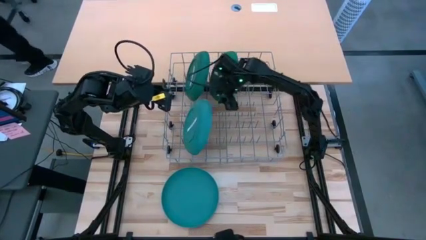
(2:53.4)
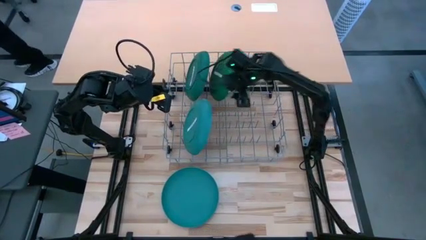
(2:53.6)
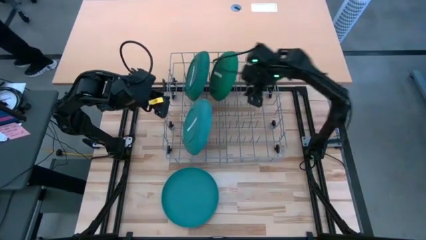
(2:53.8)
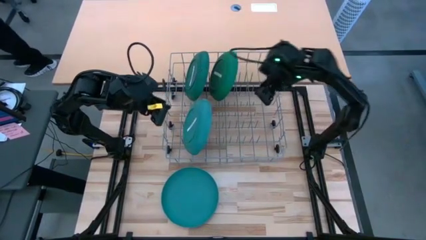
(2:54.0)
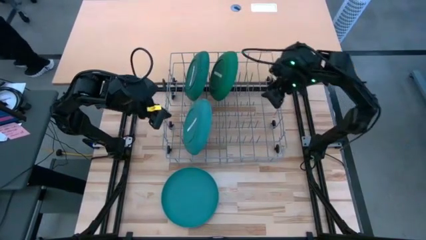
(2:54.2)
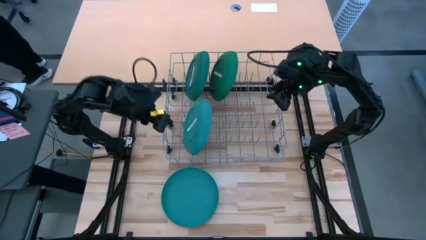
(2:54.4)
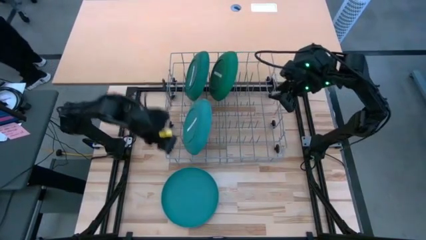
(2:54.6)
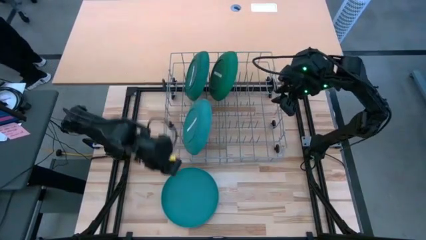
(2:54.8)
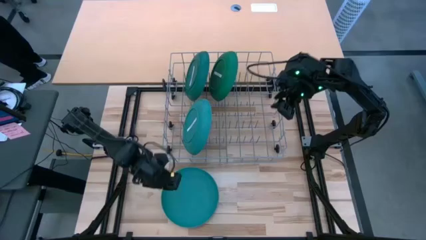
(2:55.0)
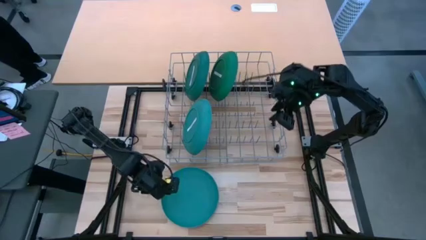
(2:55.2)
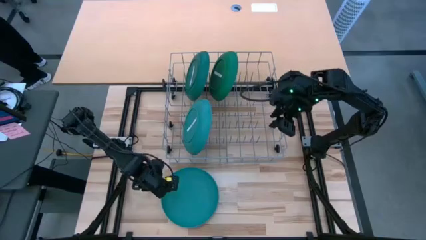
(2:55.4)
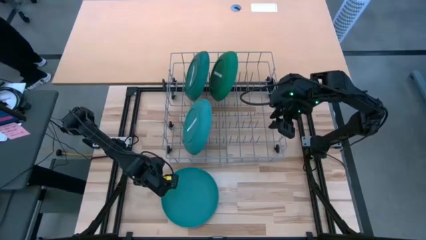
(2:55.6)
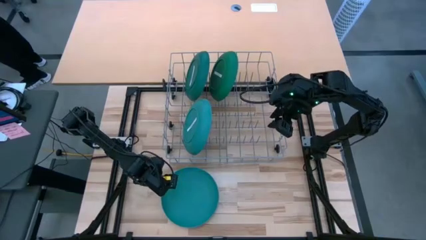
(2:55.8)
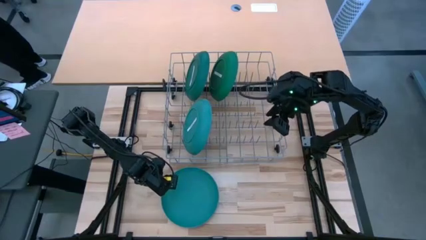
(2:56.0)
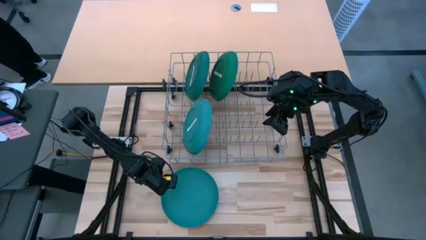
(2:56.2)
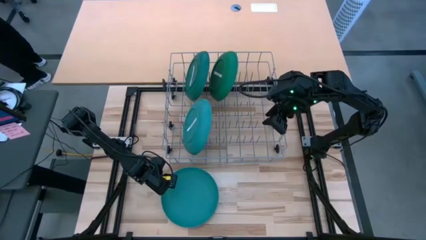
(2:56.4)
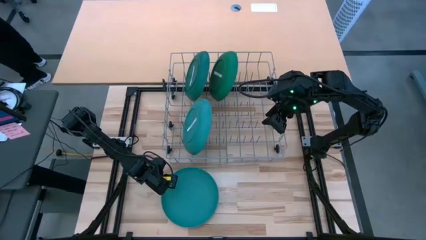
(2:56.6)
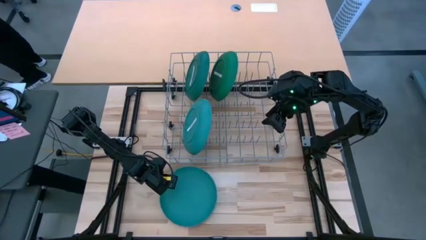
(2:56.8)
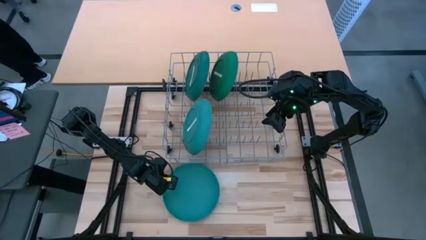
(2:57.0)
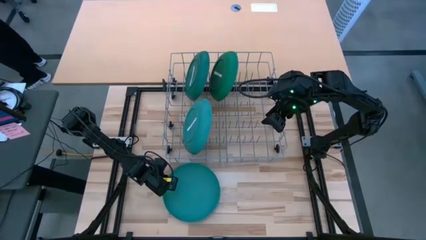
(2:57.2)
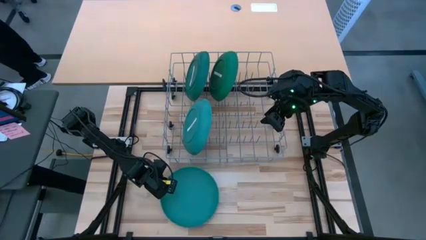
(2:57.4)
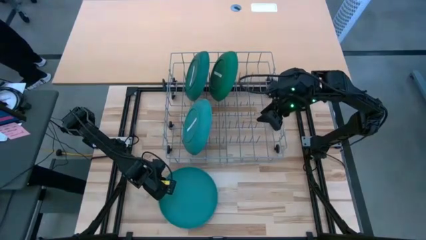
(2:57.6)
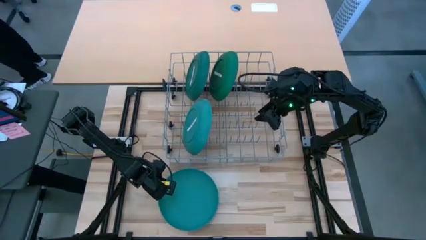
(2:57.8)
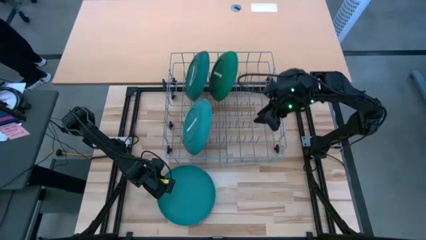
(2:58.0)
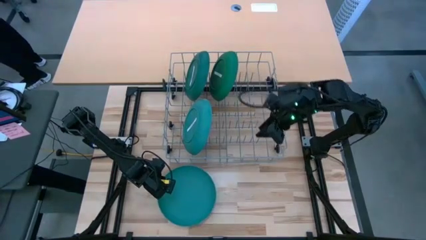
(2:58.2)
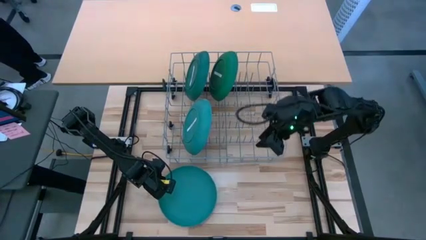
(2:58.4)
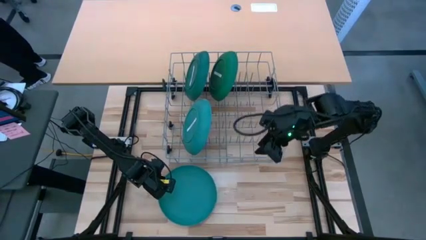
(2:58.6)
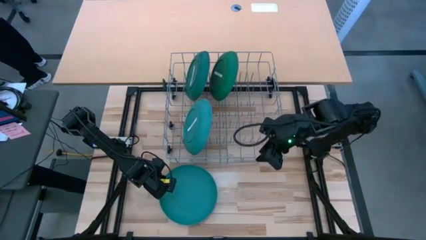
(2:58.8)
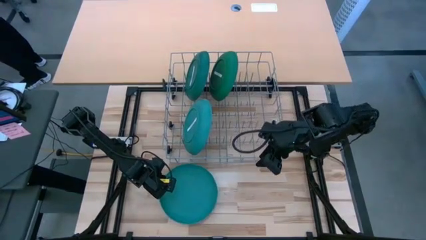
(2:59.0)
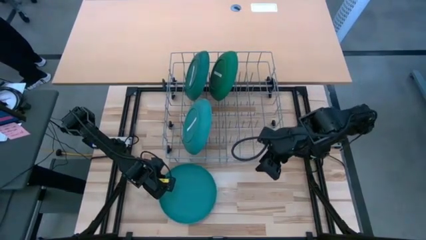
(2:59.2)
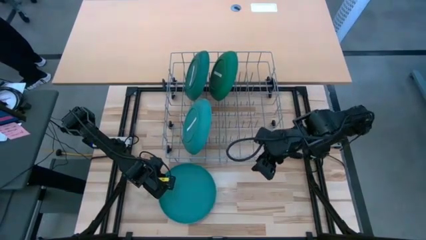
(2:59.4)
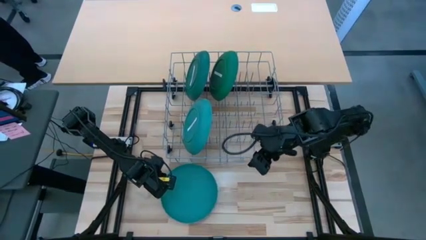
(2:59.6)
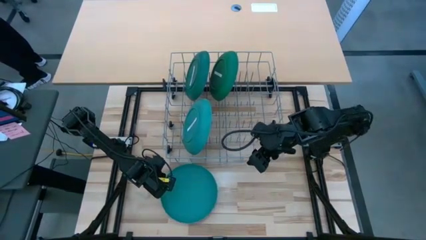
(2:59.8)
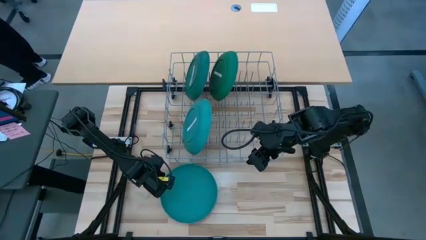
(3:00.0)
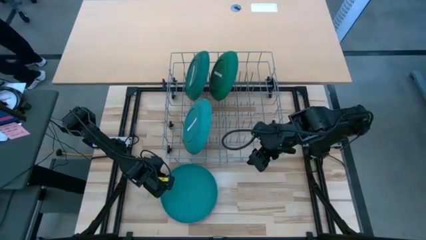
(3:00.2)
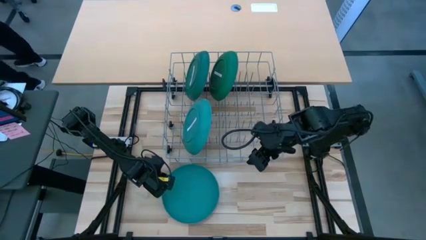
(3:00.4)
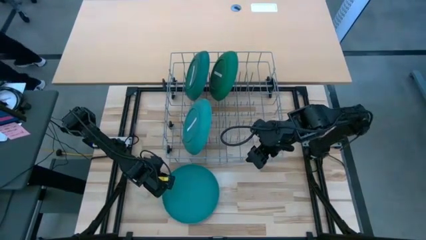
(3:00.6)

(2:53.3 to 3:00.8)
Task: Sort dishes
Put the blue plate into the dish rack

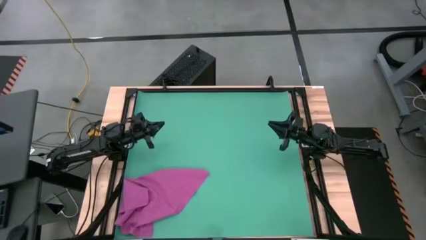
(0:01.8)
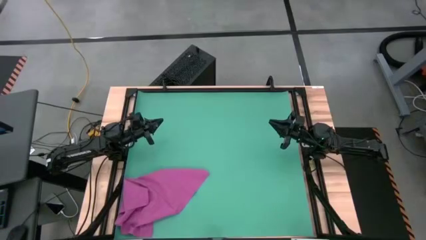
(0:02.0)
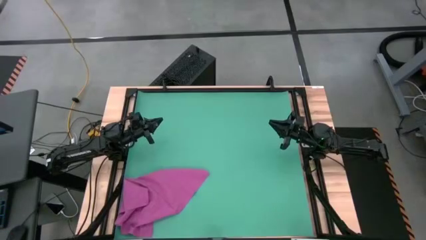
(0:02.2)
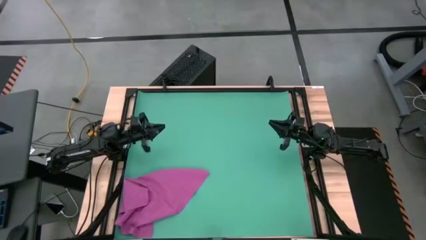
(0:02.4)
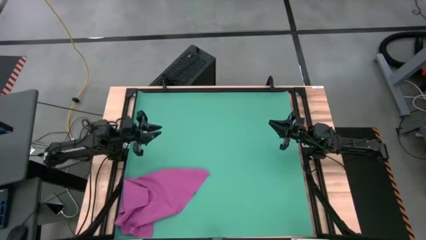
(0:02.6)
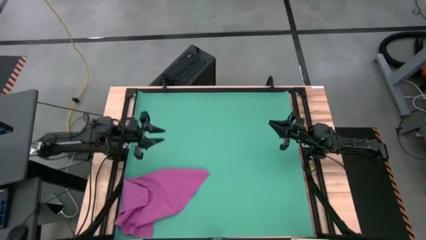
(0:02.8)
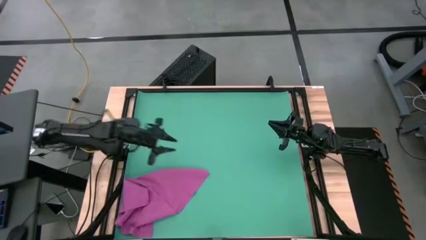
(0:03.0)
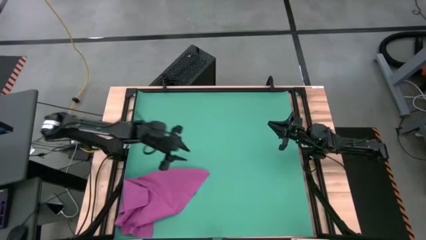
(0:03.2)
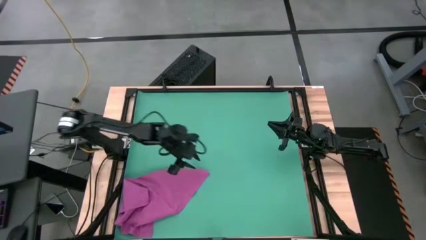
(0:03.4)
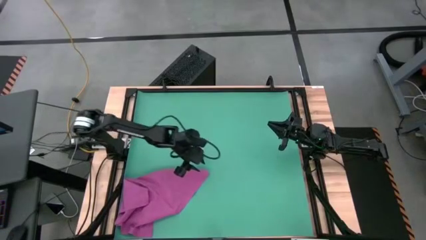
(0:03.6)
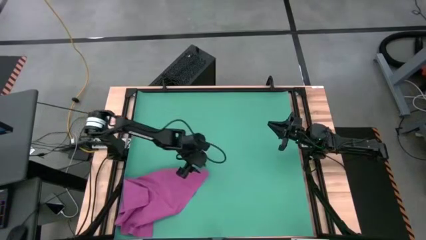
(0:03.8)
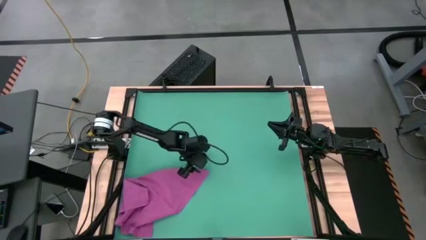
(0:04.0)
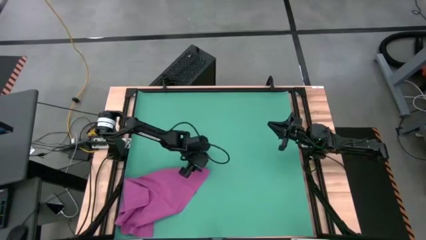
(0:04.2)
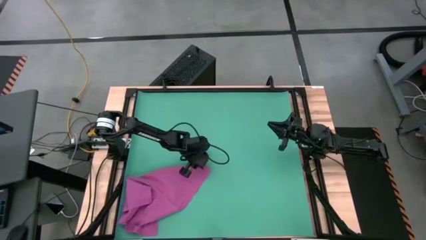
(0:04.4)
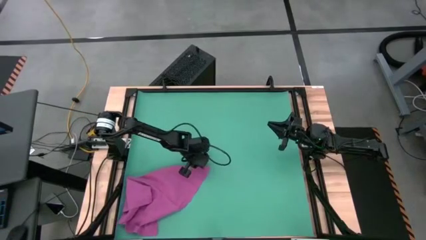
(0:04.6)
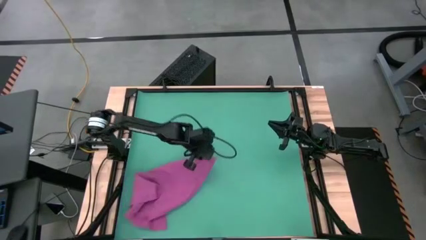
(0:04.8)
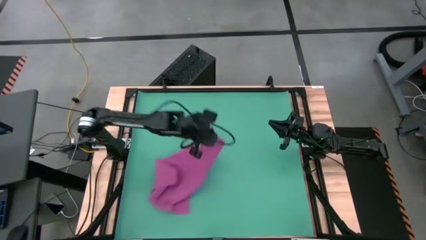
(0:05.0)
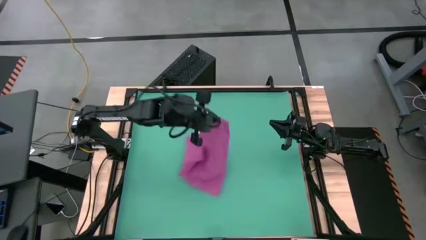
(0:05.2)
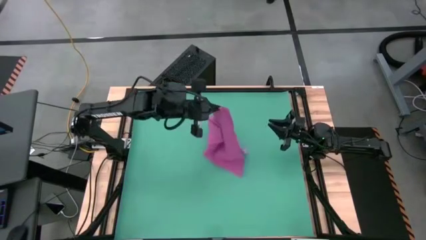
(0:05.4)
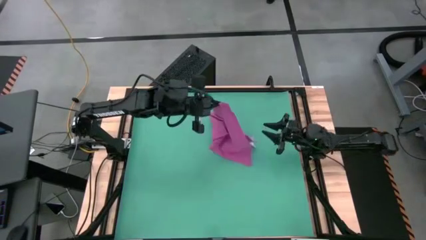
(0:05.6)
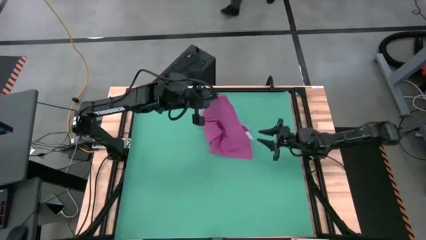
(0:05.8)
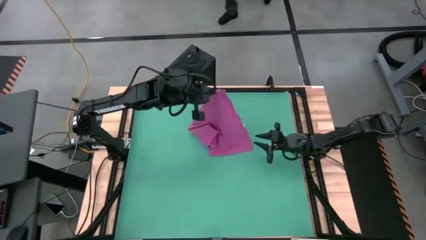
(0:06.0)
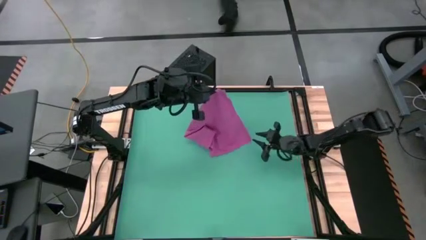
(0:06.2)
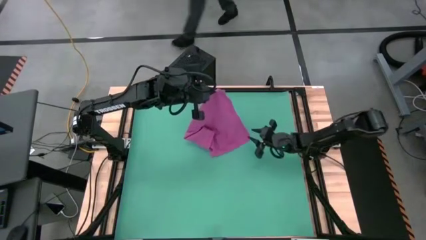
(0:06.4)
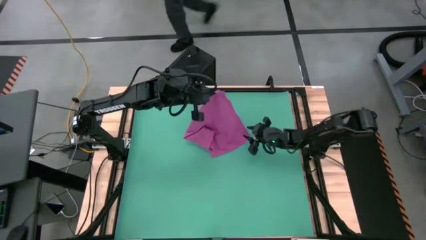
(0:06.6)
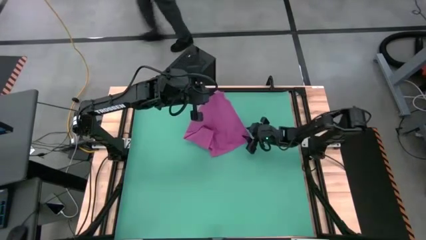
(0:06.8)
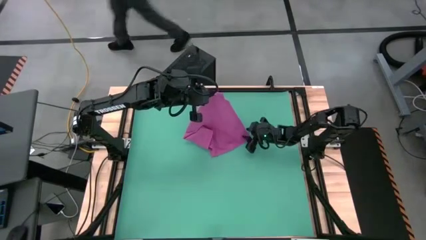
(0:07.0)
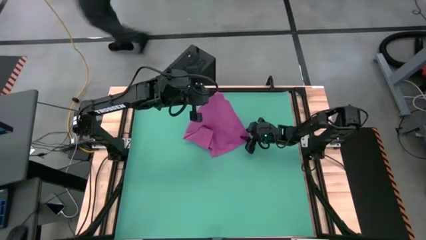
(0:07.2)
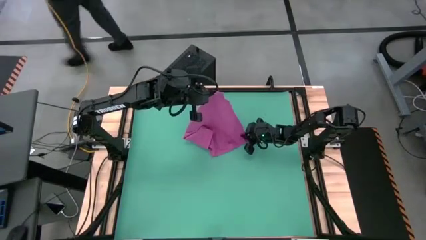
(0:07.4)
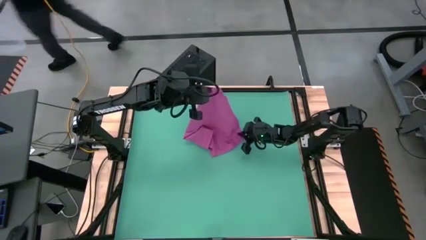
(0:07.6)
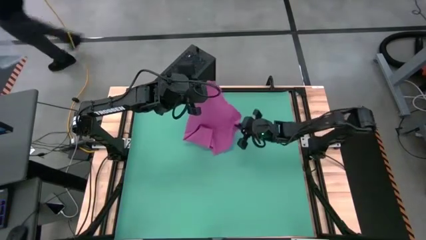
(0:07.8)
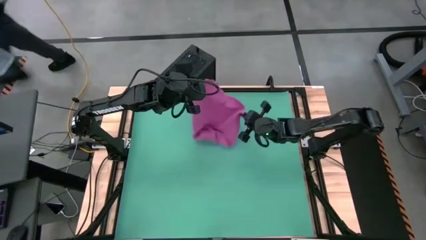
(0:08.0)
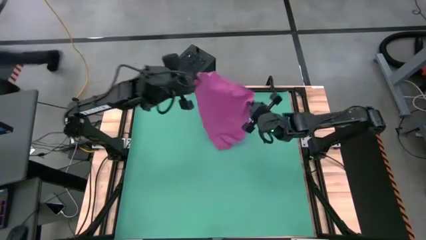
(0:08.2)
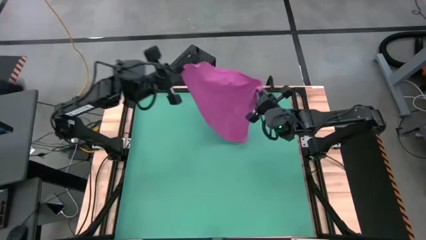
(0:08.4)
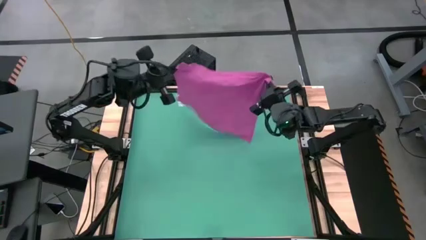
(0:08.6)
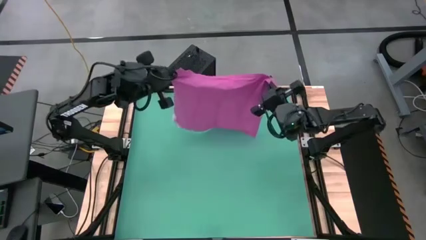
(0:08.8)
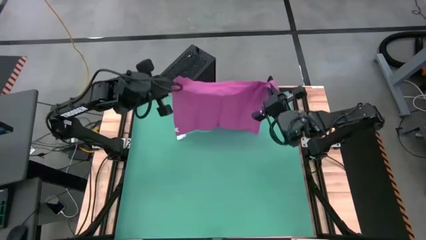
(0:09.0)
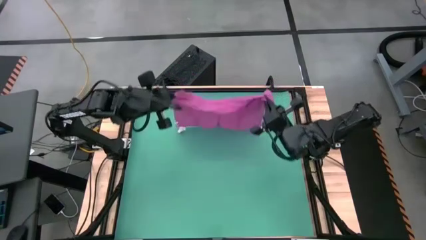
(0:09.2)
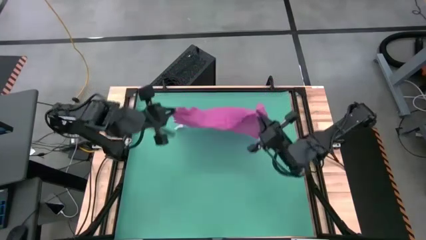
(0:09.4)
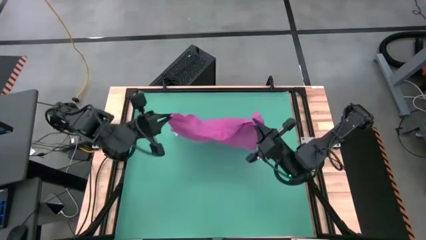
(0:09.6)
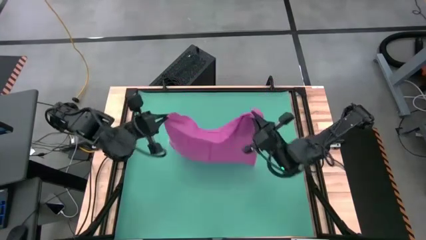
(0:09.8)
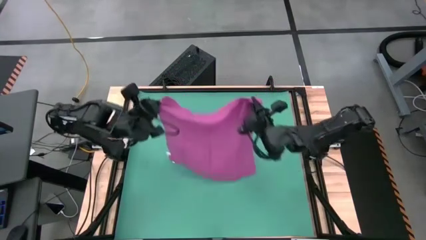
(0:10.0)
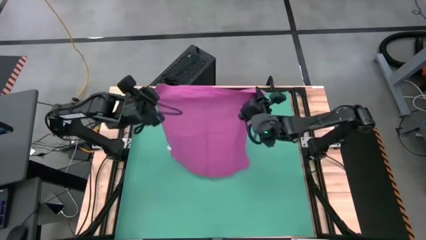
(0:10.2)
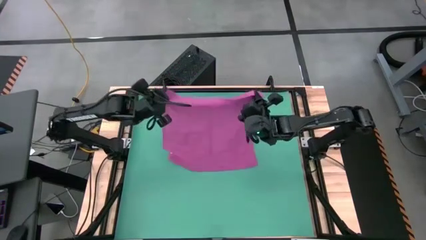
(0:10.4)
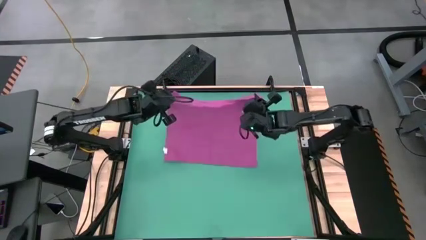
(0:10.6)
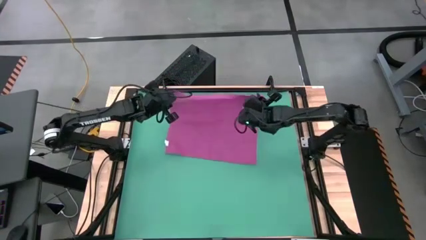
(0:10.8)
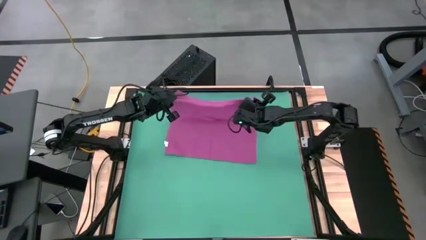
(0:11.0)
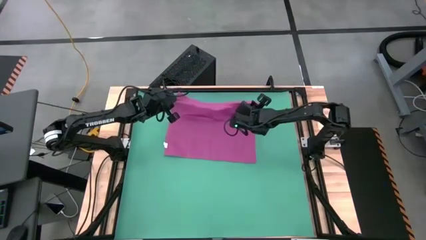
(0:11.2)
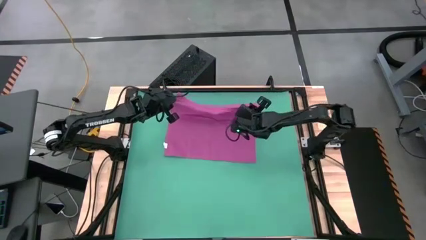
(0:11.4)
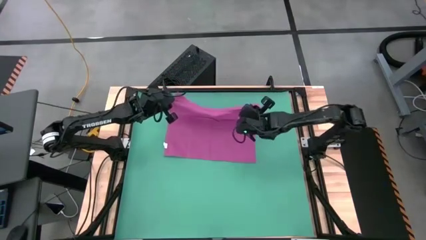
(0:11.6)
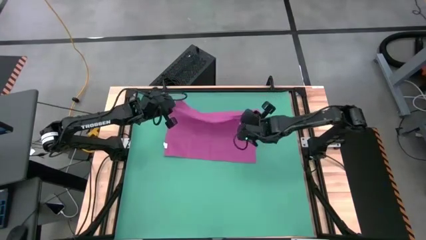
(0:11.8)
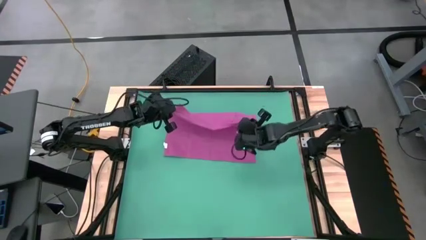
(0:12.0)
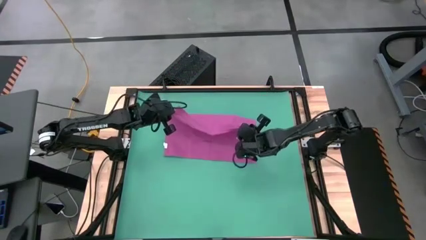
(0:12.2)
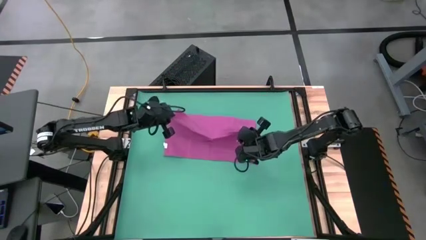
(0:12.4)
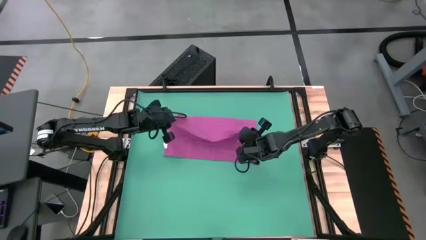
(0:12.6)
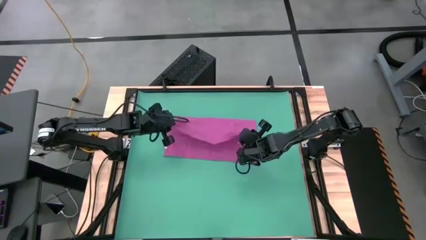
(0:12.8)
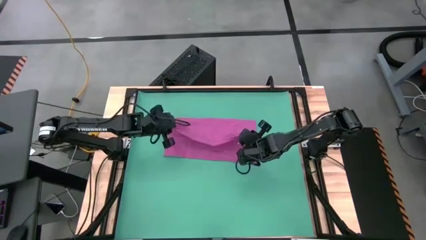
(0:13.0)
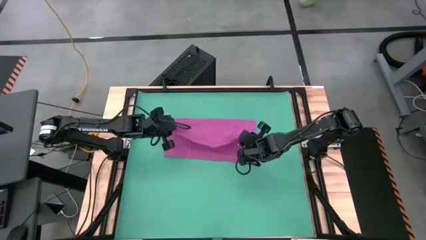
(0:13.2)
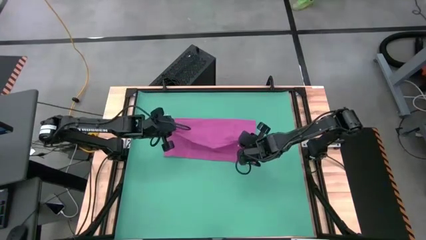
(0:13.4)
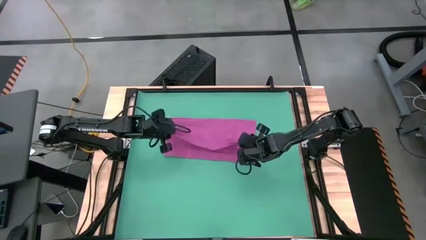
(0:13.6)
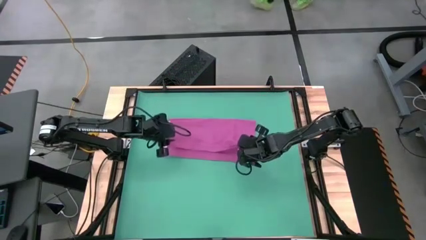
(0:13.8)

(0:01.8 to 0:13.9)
Task: Roll towel
Fold the pink towel
